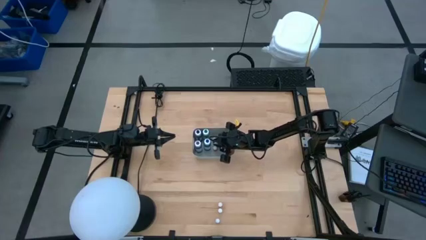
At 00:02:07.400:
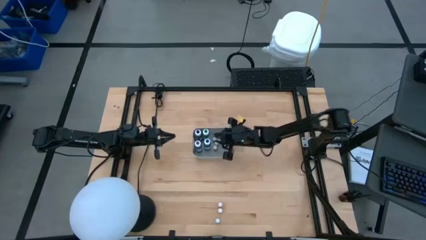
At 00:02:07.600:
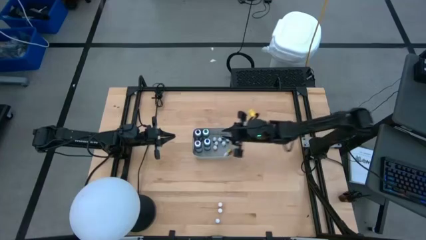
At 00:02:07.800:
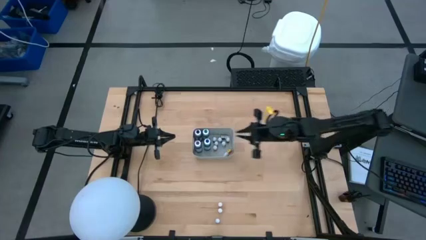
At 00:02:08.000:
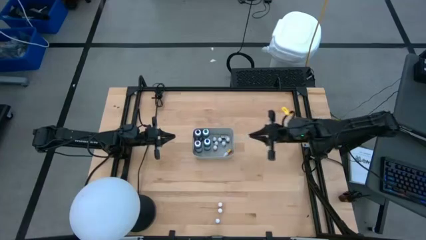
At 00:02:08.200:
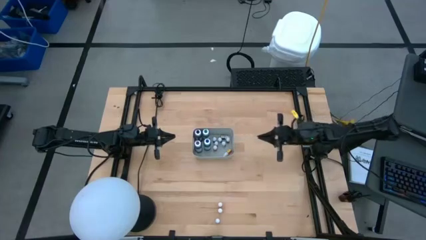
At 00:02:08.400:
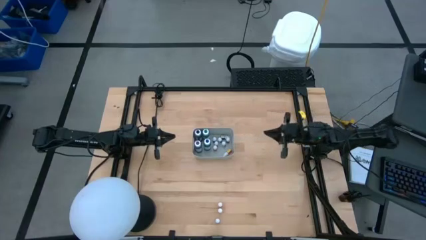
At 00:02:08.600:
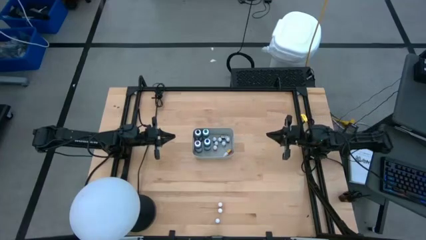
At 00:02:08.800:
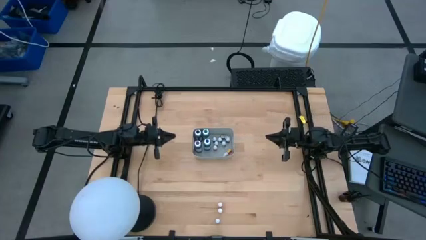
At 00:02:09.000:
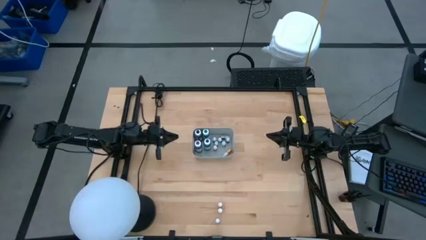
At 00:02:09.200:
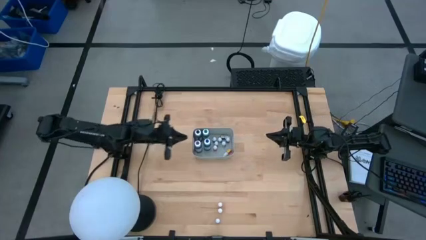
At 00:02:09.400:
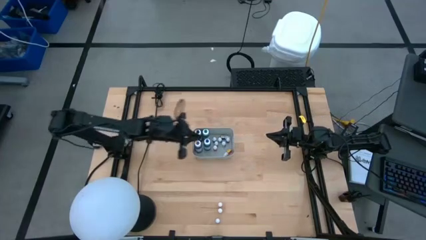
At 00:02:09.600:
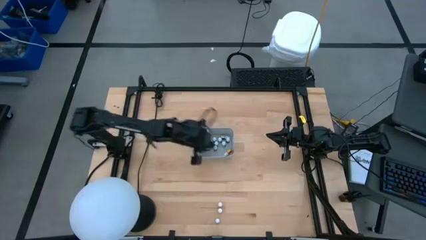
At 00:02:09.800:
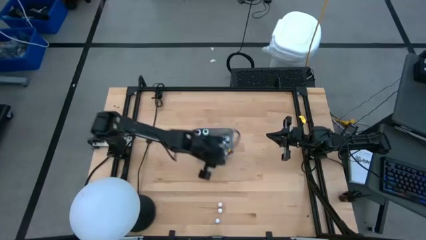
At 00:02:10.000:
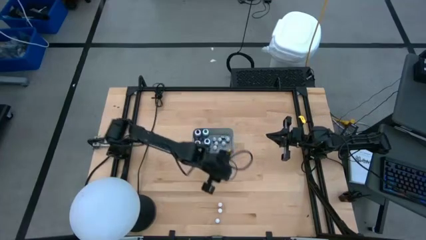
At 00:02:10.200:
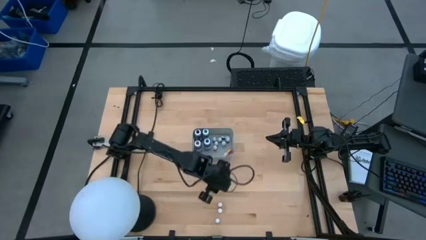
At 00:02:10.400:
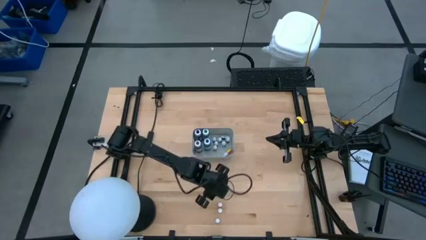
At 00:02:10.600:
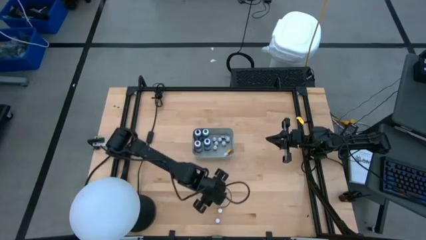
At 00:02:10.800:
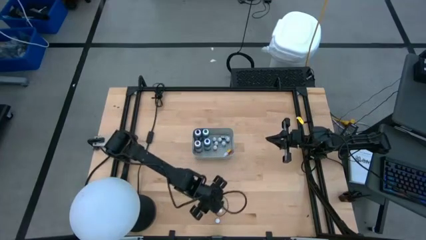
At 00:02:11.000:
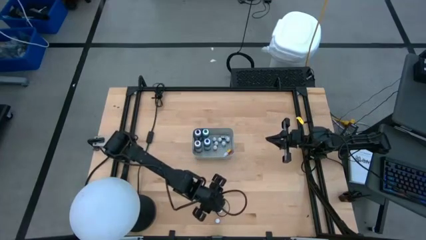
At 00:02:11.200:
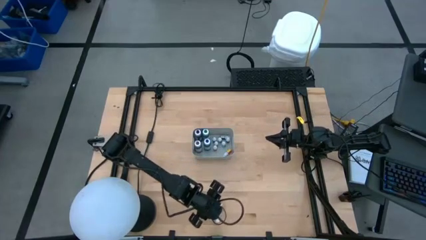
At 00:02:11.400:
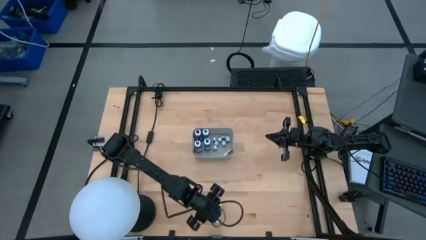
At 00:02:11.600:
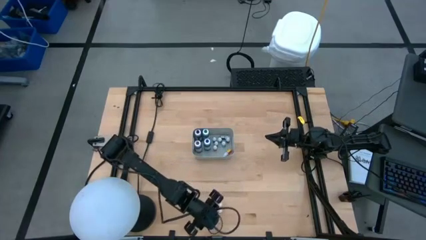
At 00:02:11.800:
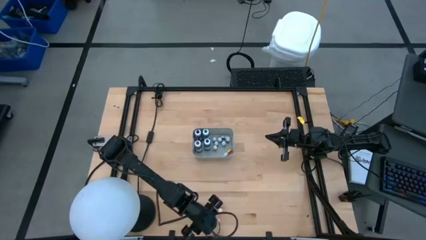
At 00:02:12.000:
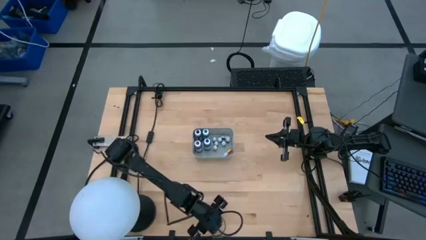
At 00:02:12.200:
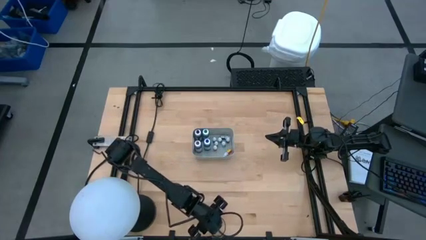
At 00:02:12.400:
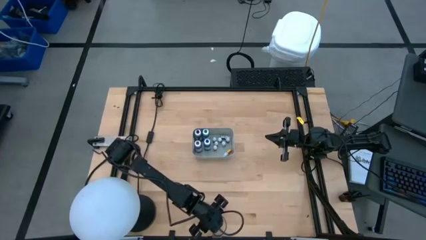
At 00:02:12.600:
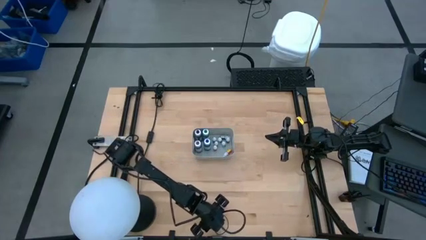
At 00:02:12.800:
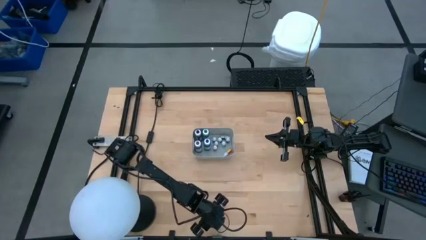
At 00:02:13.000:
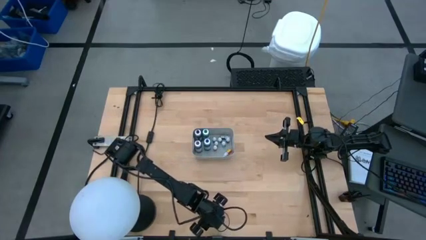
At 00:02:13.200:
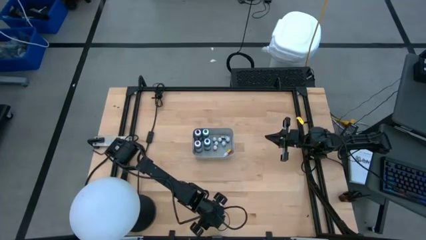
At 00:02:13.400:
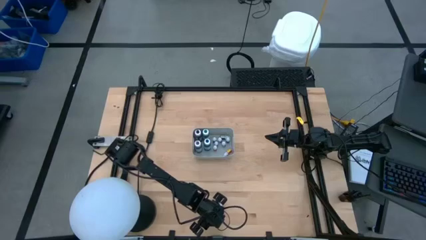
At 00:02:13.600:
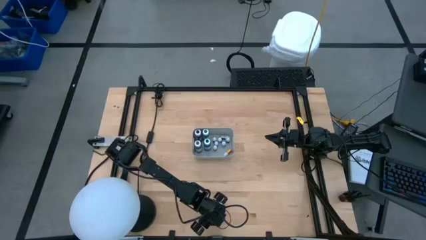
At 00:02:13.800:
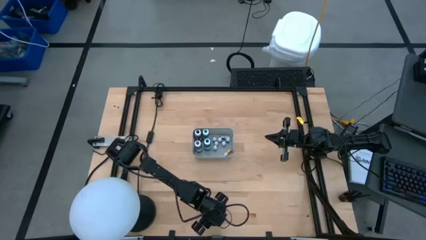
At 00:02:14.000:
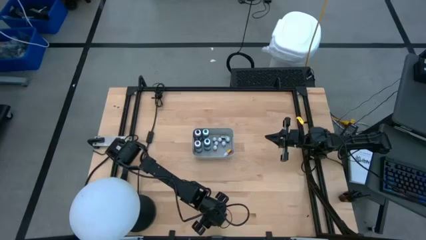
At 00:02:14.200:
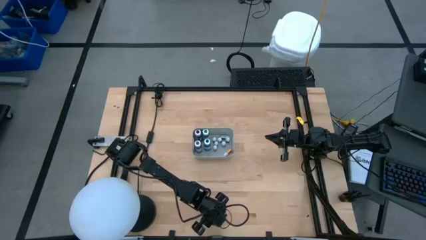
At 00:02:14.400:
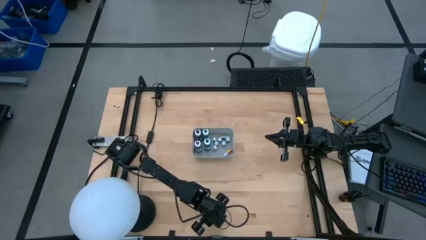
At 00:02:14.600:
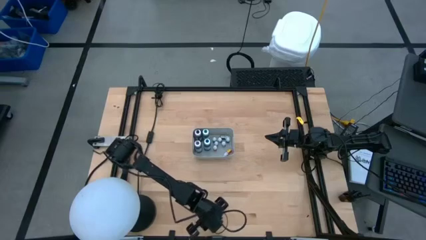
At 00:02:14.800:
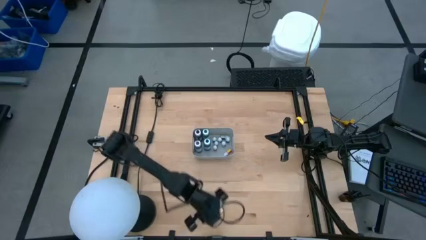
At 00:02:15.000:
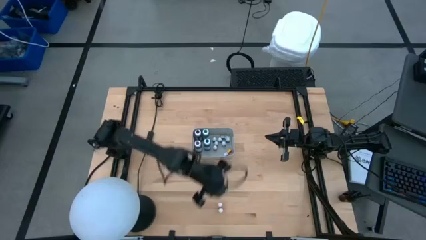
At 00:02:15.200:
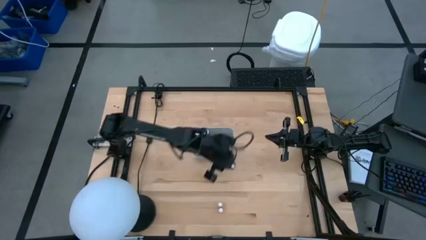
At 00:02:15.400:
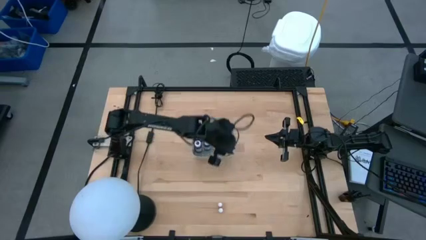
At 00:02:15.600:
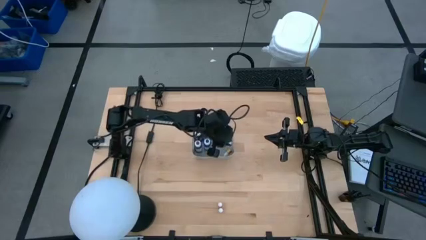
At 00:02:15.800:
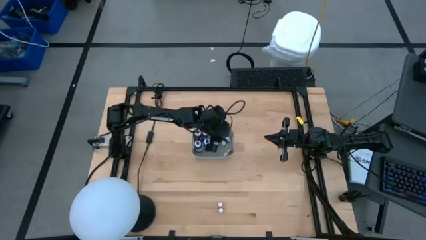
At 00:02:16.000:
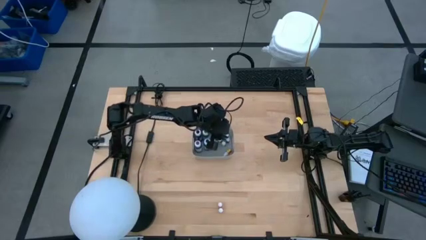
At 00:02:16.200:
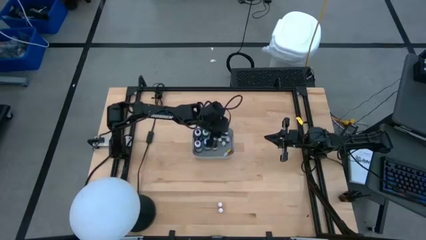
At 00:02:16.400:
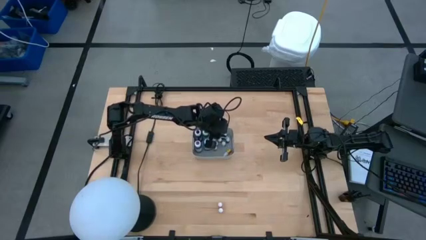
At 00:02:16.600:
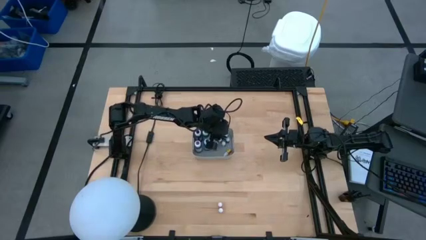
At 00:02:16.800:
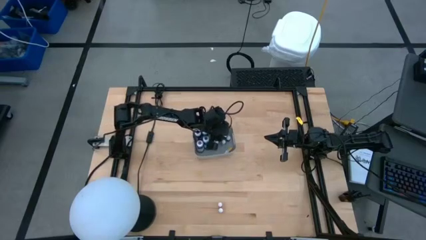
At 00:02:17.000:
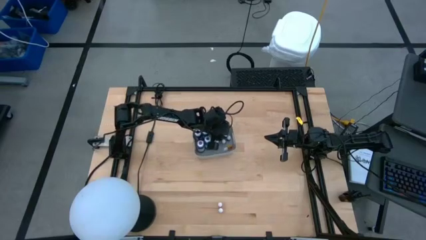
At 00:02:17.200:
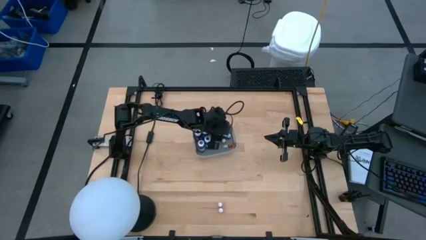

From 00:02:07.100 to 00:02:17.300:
Task: Pick & Place food coloring
Put the small brown food coloring bottle into the gray bin

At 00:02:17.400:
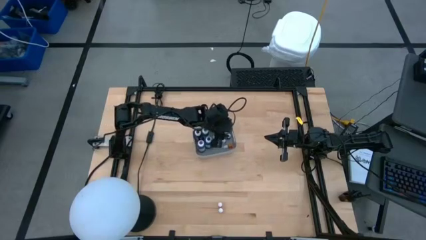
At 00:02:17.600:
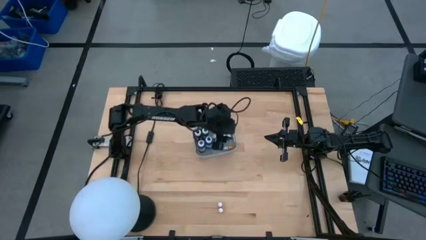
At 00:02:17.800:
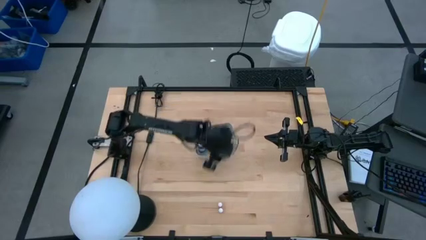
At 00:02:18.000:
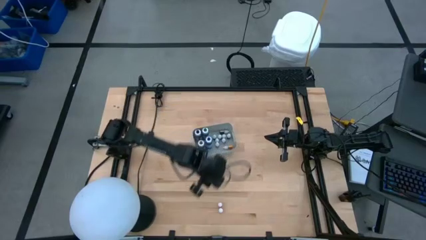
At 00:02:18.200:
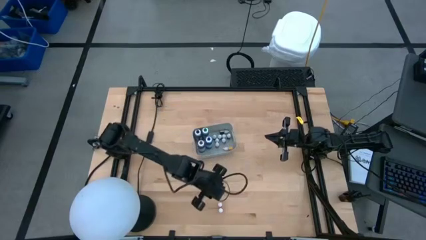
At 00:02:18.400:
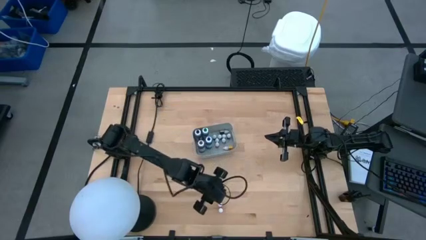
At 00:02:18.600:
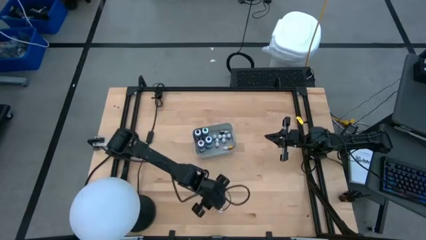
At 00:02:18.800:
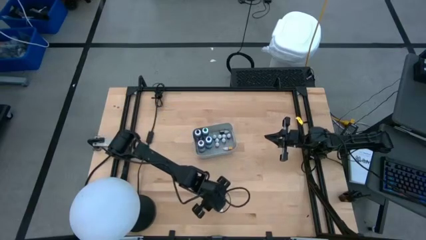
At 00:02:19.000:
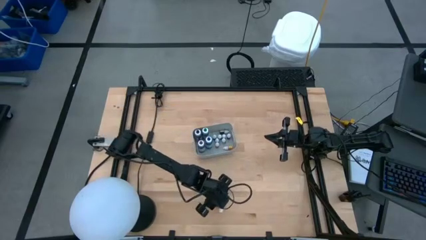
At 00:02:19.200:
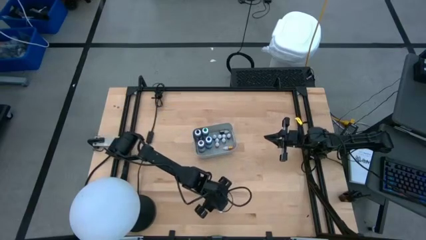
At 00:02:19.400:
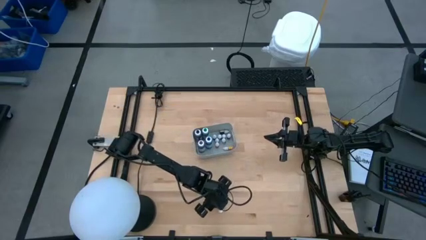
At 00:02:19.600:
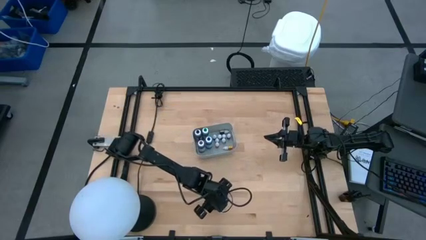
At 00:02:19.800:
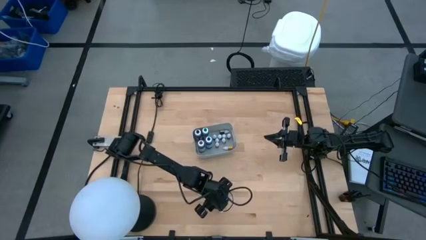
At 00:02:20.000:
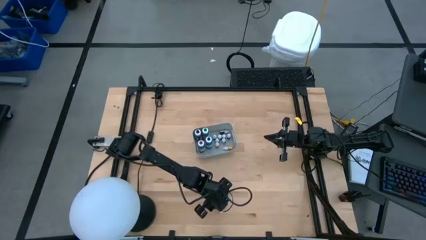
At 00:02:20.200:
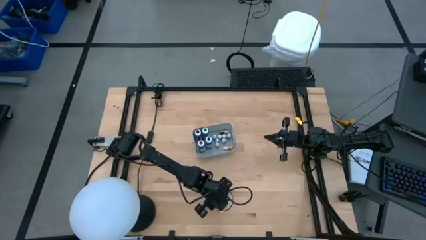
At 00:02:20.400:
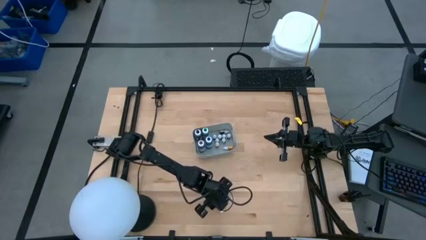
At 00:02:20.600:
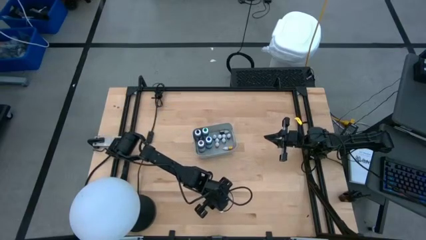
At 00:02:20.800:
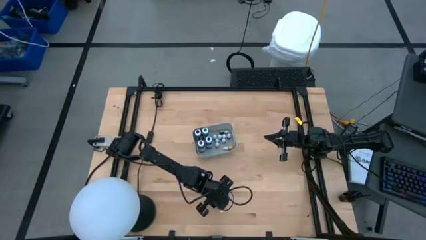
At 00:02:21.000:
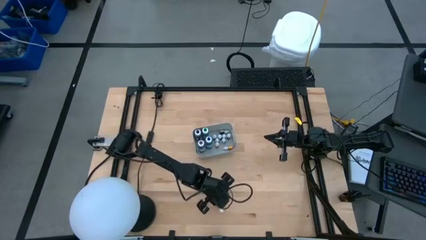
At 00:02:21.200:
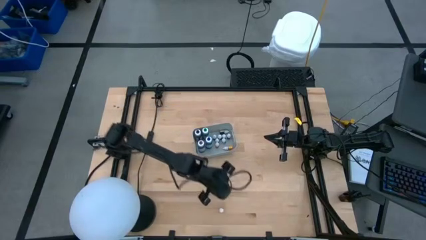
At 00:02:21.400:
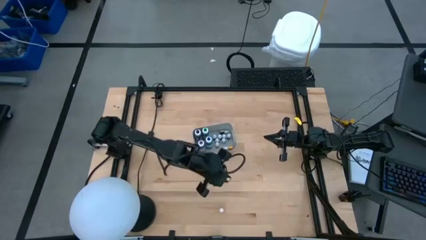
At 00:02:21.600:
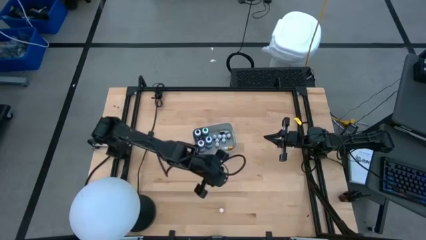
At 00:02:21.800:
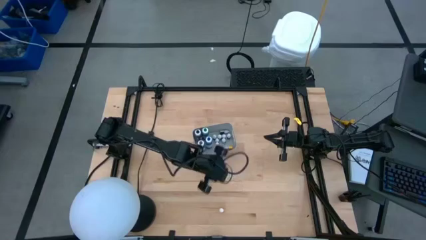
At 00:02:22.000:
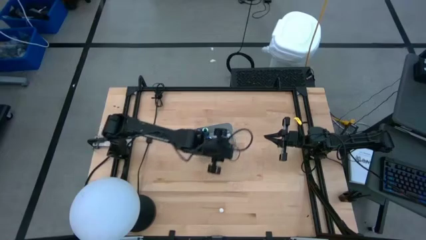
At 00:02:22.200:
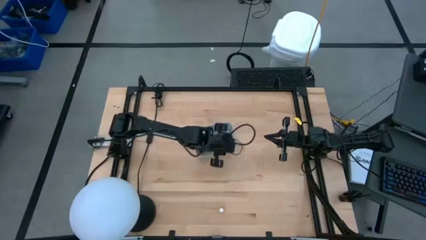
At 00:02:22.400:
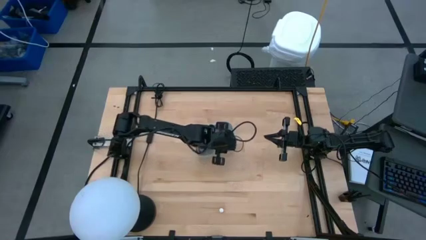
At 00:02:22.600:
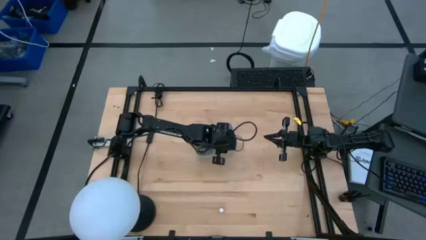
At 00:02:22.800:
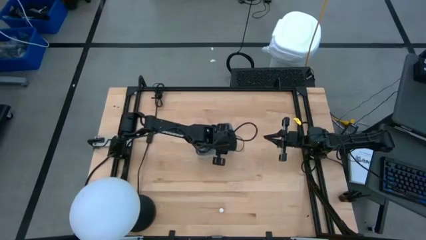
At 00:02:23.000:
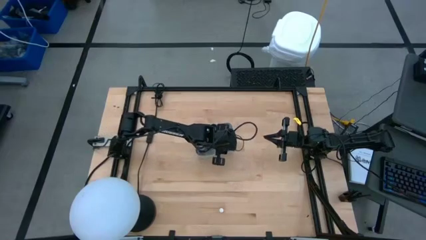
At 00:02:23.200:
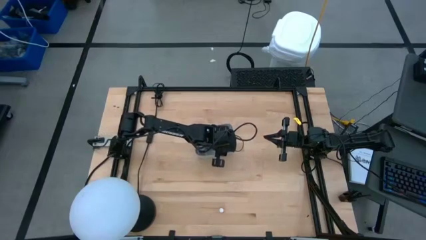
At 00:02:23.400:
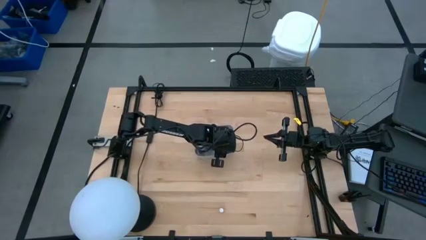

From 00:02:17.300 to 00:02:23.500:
Put the small orange food coloring bottle into the gray bin

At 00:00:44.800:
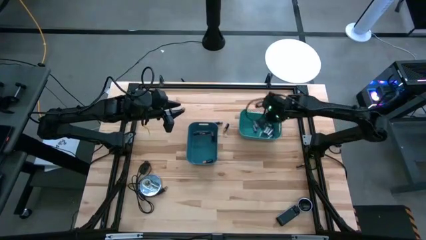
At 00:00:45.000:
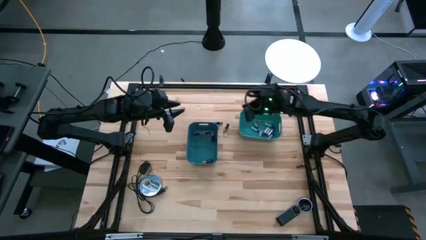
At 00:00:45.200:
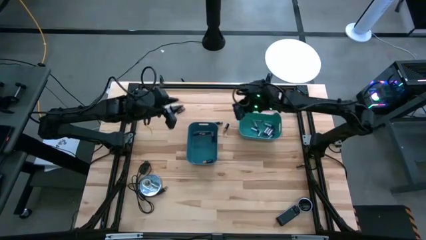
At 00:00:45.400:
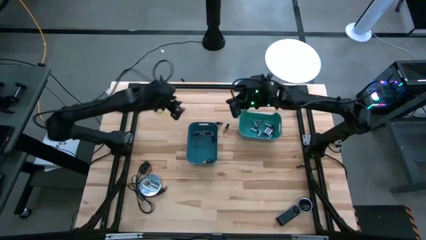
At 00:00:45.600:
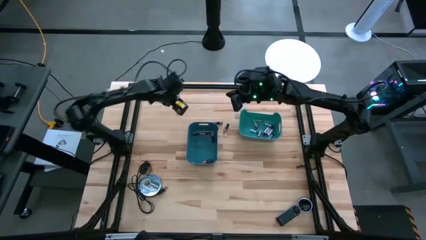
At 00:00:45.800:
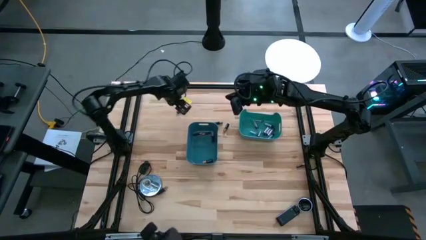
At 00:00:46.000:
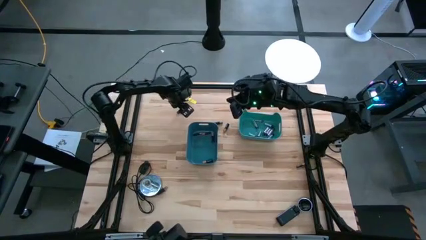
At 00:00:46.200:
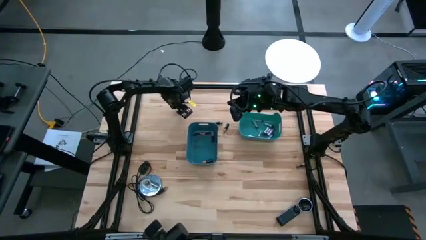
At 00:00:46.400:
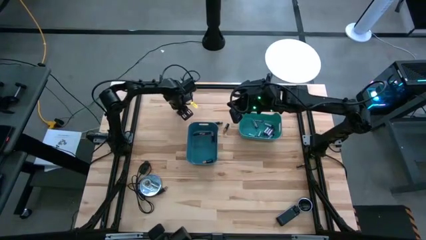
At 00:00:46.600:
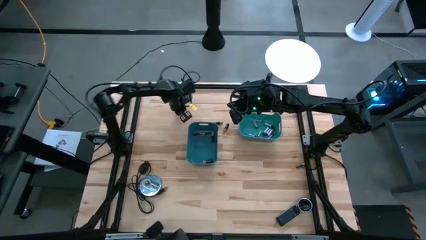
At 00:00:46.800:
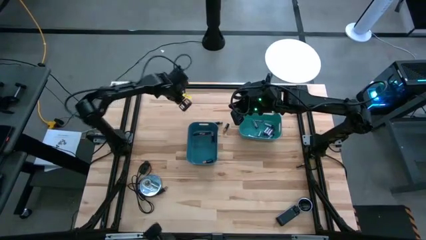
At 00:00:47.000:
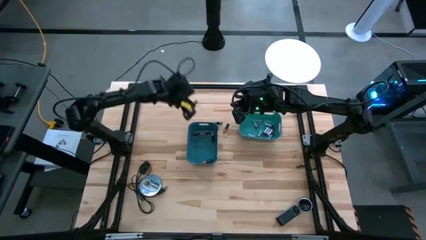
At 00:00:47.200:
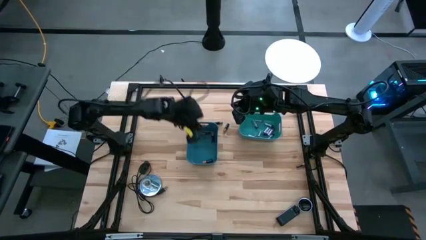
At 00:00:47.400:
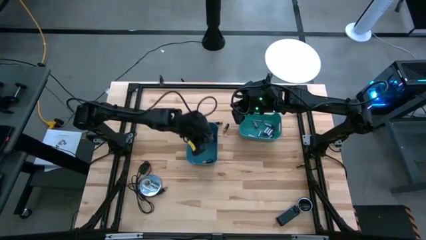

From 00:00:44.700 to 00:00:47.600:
Task: Sort batteries
Put the black battery into the blue bin
